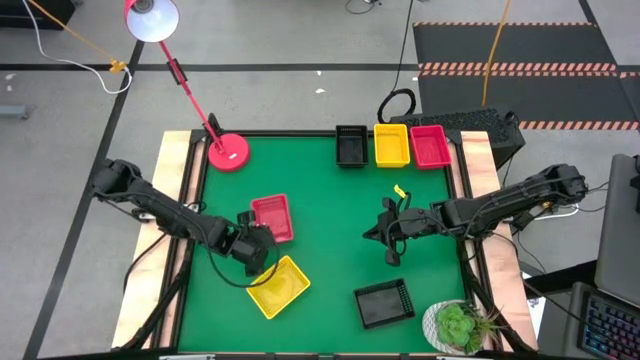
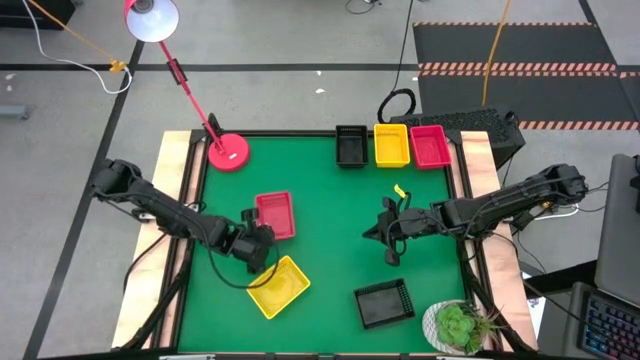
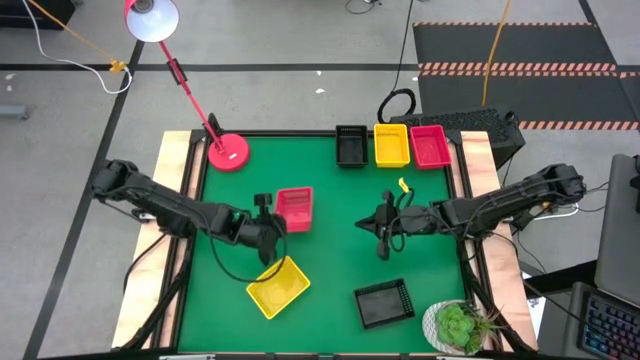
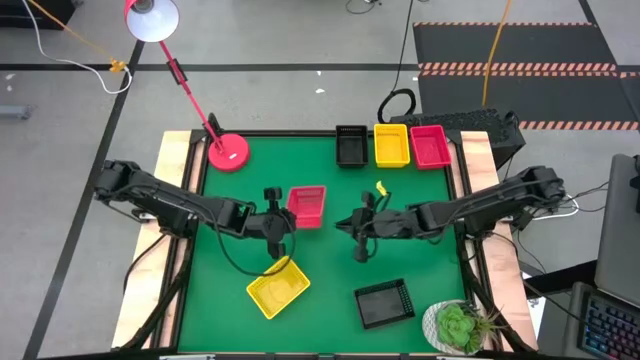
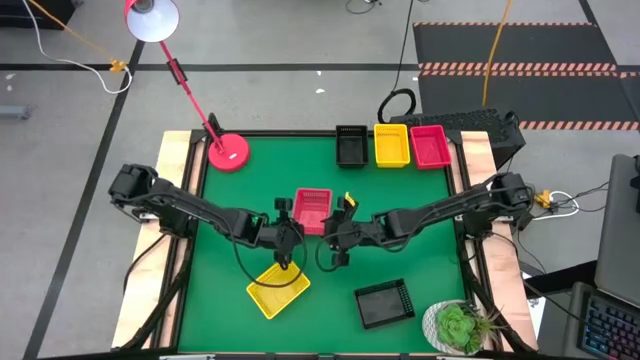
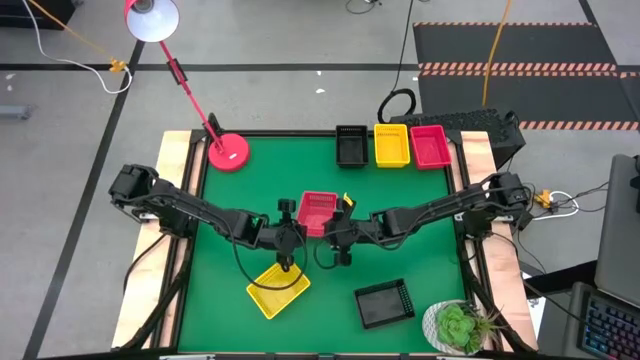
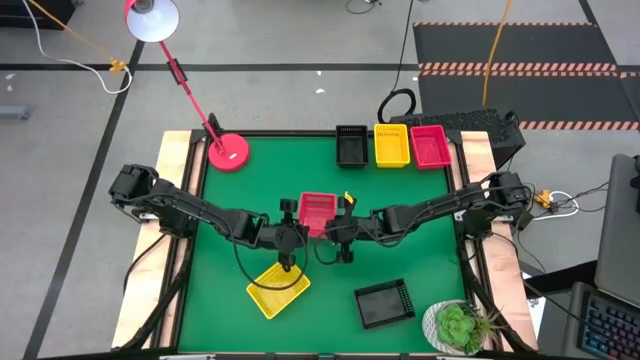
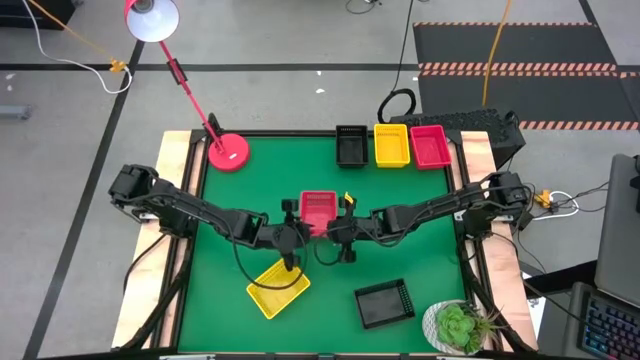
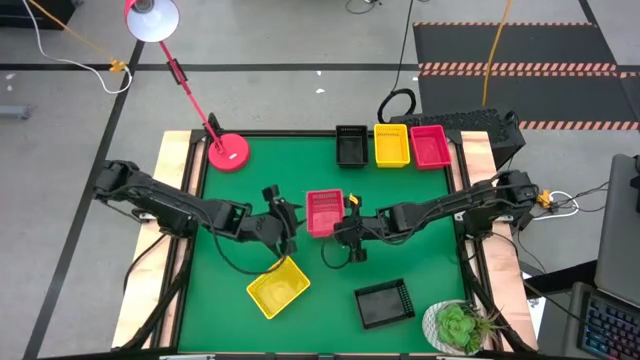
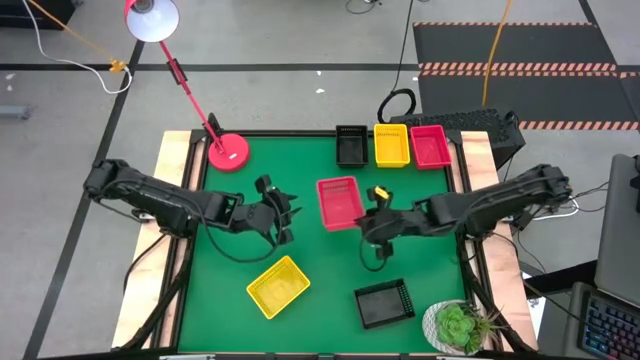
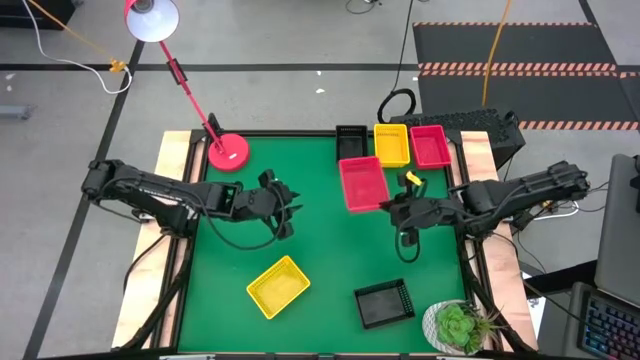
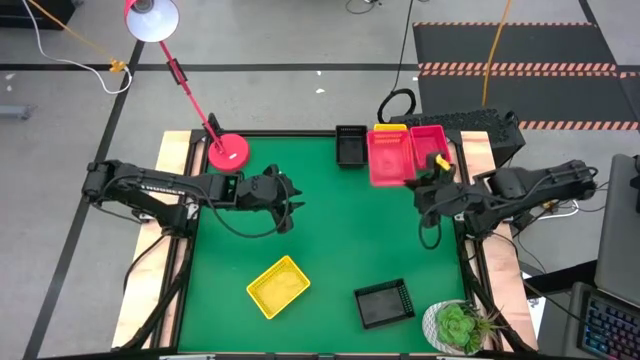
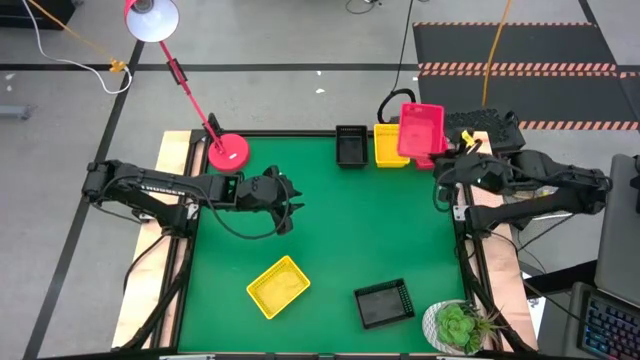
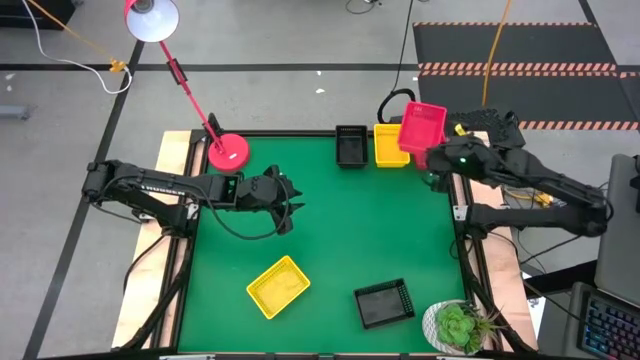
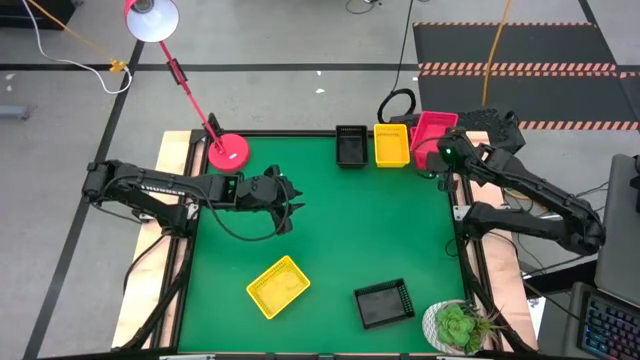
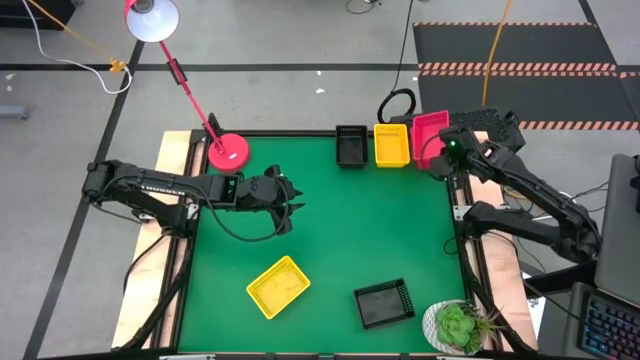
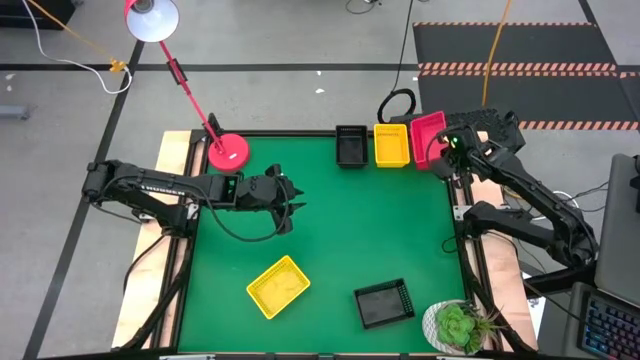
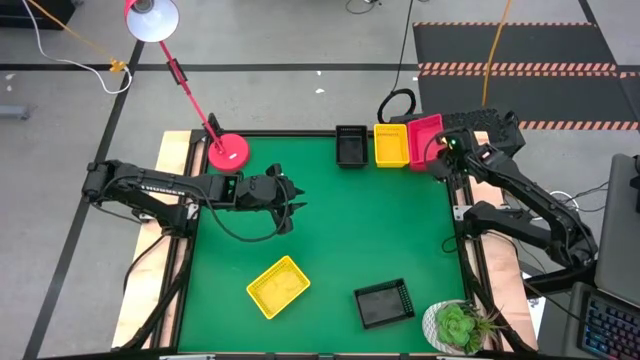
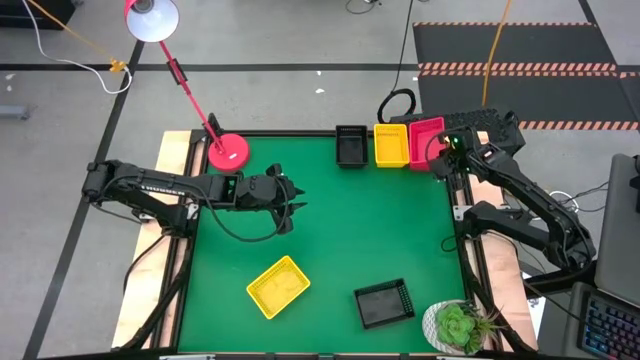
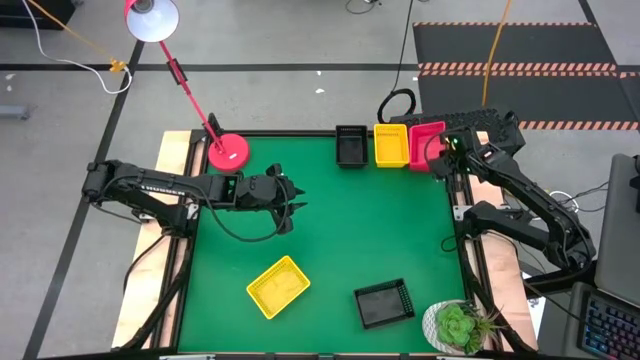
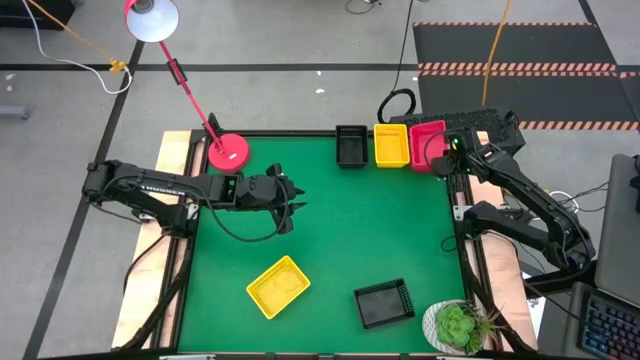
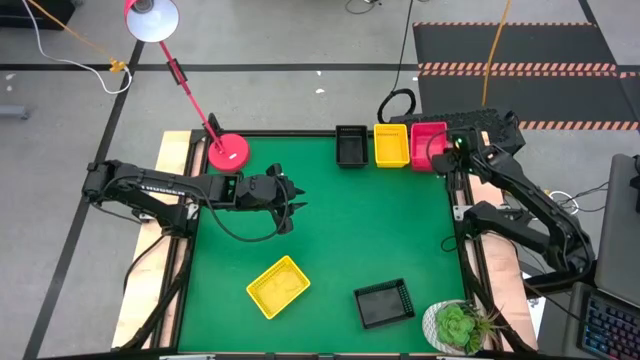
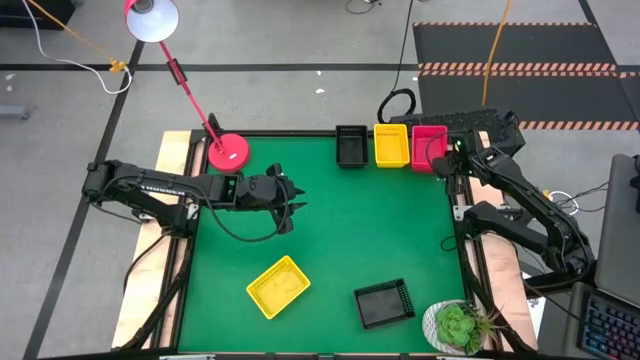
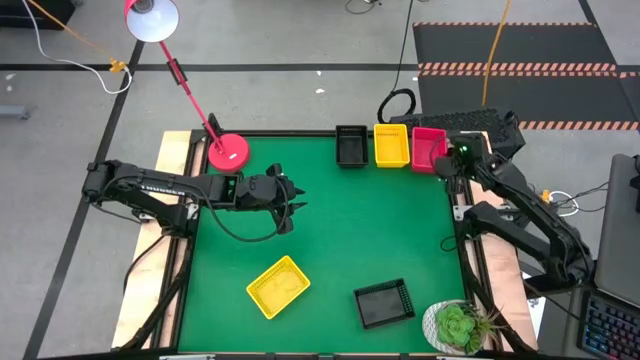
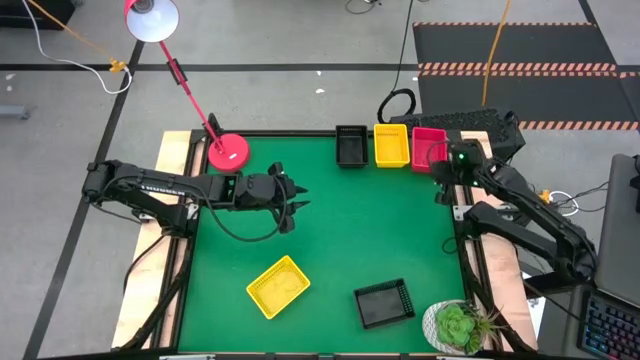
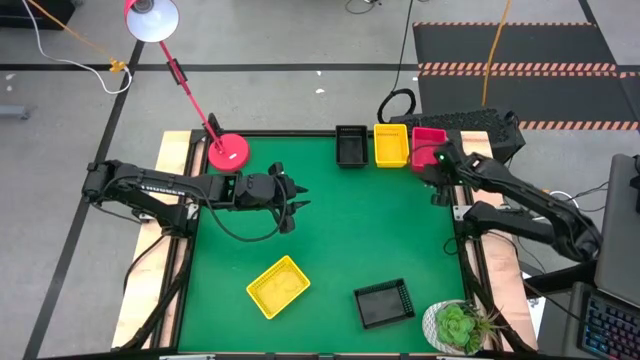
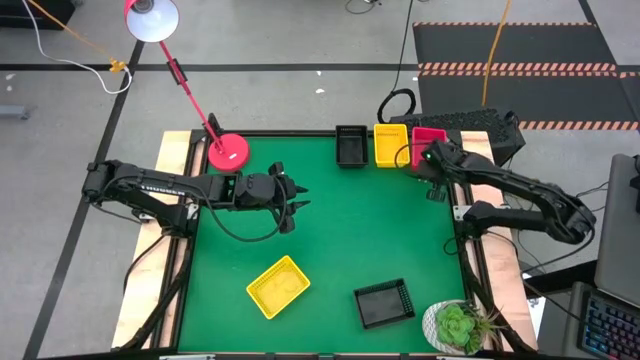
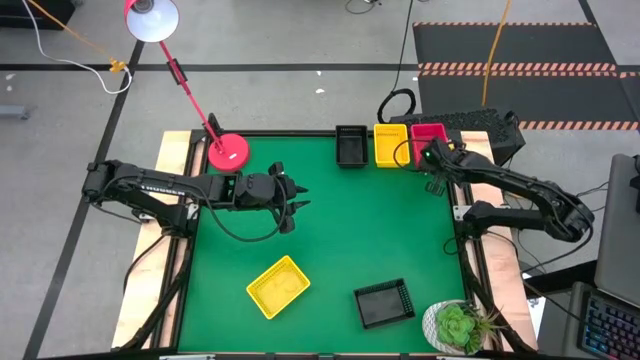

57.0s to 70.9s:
Stack the left red bin on the right stacked red bins

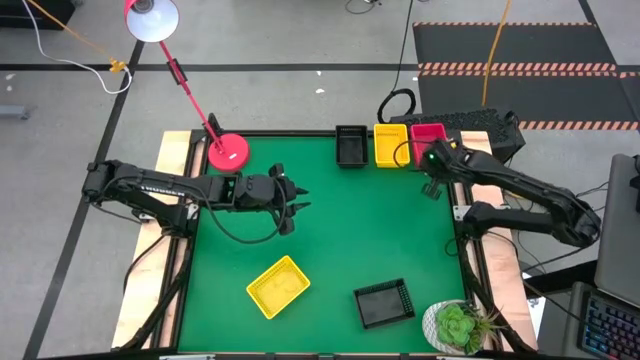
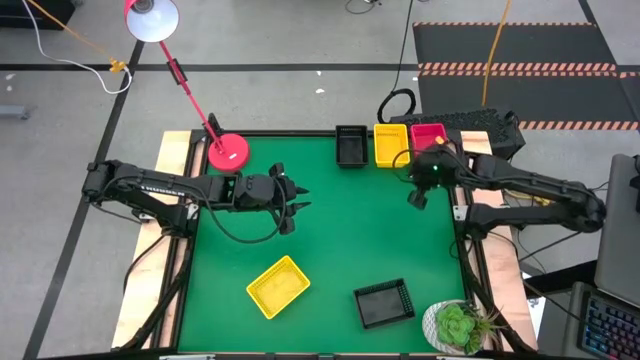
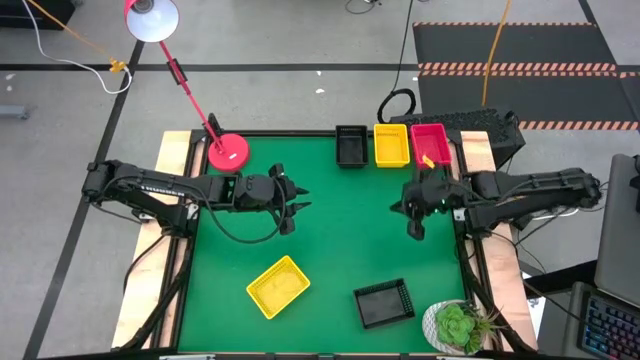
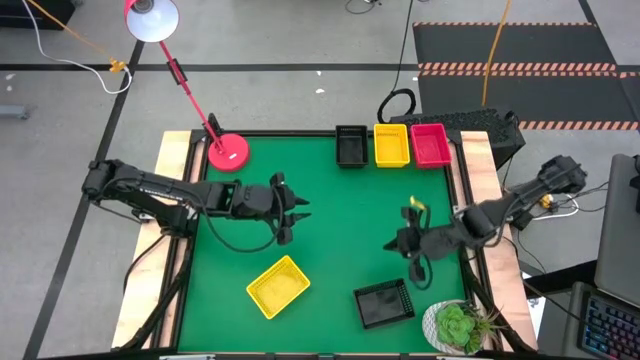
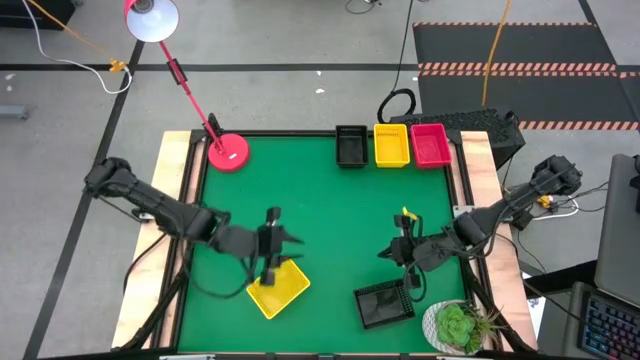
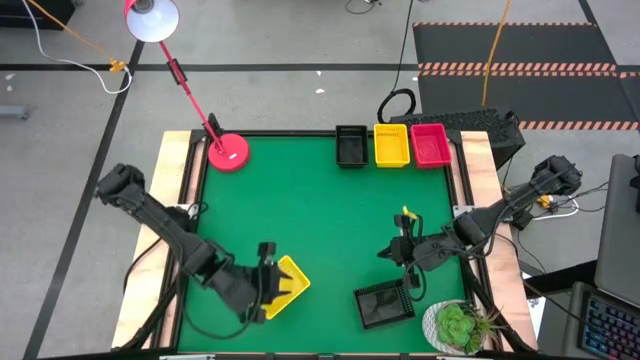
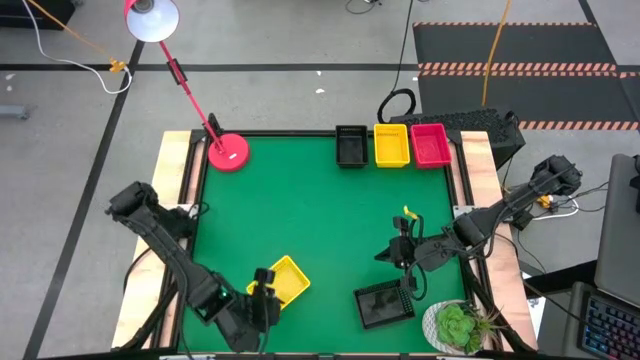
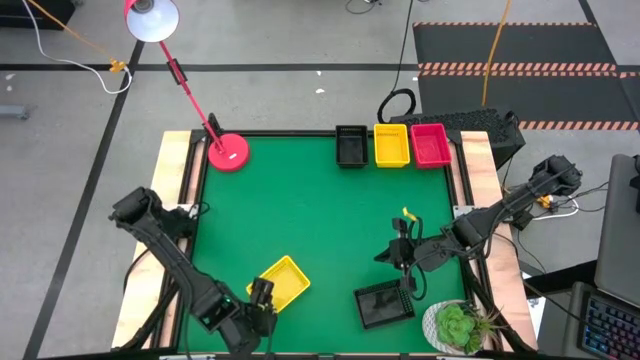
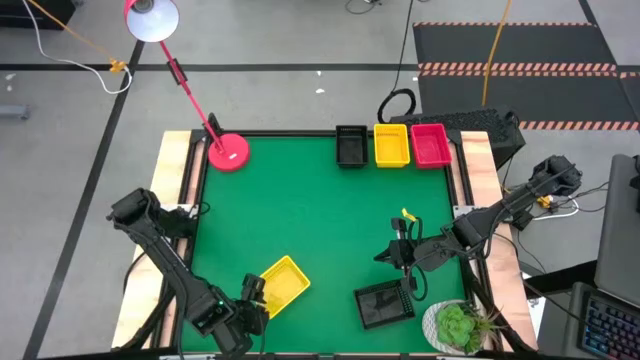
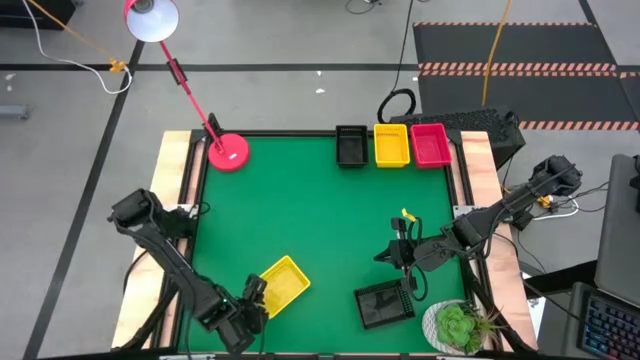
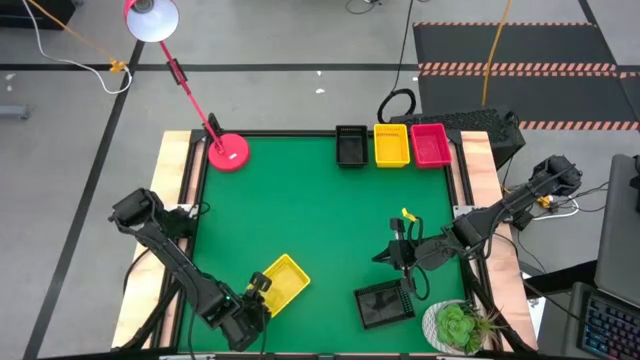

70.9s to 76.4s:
Stack the bottom yellow bin on the top stacked yellow bins
